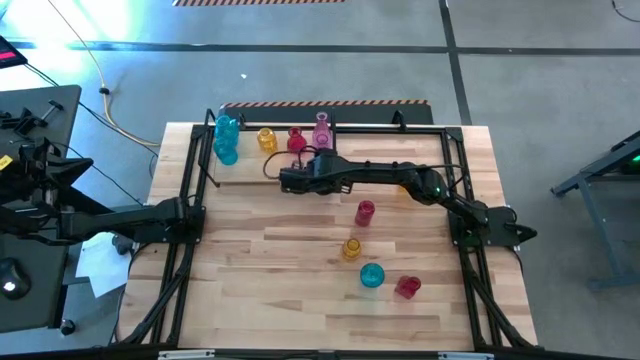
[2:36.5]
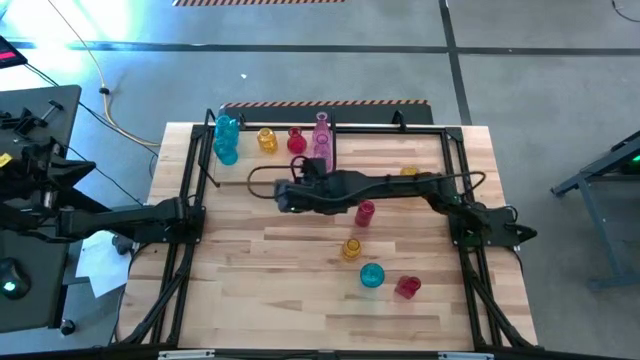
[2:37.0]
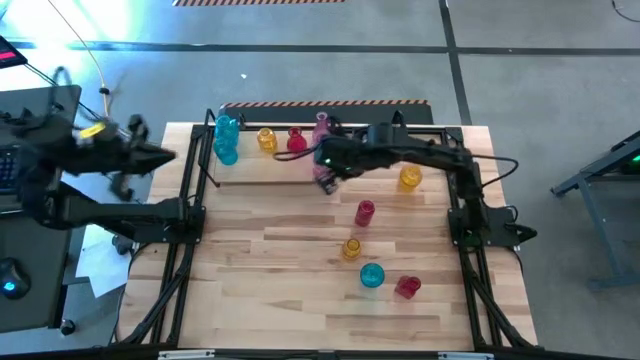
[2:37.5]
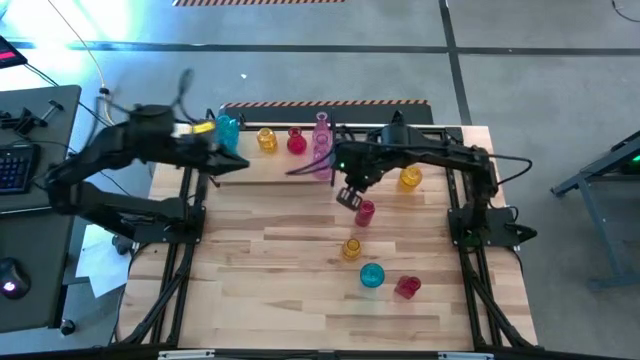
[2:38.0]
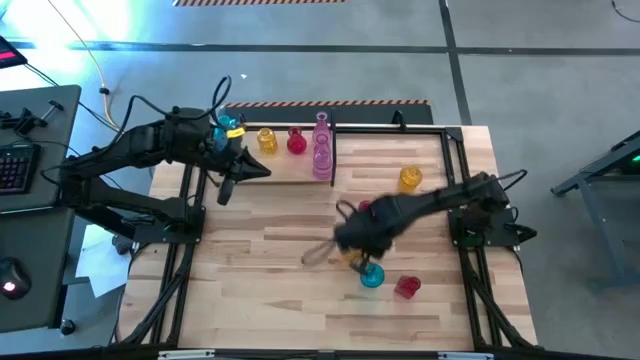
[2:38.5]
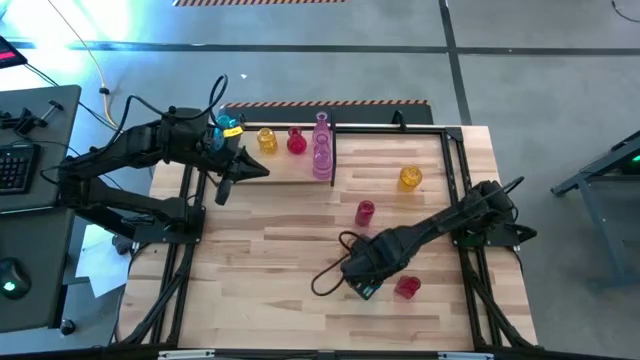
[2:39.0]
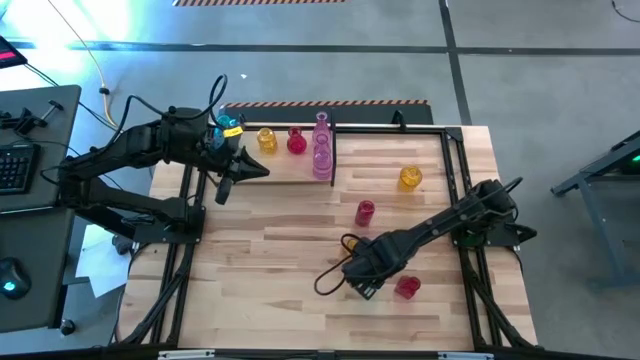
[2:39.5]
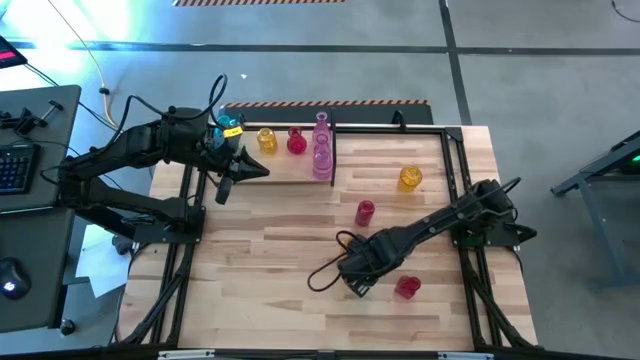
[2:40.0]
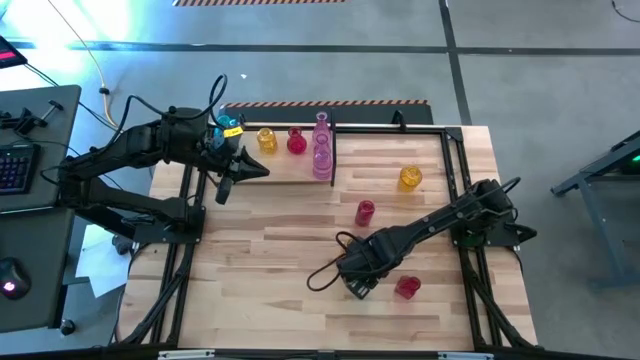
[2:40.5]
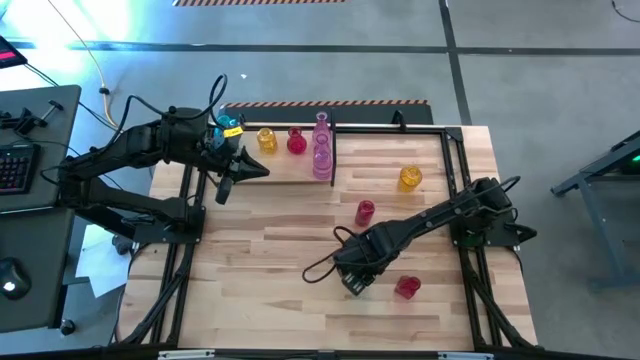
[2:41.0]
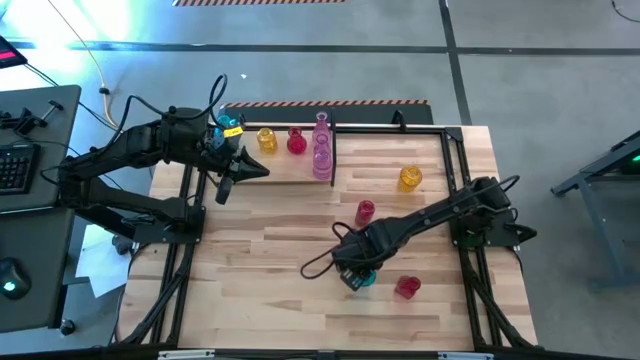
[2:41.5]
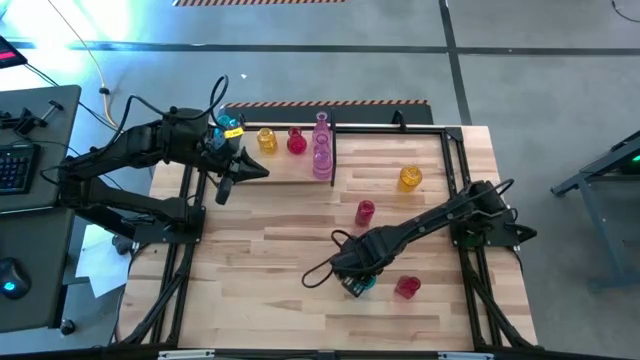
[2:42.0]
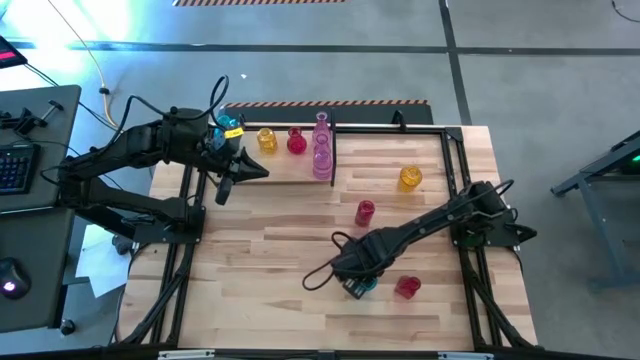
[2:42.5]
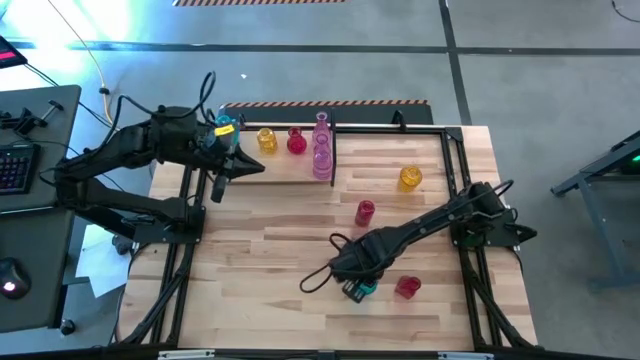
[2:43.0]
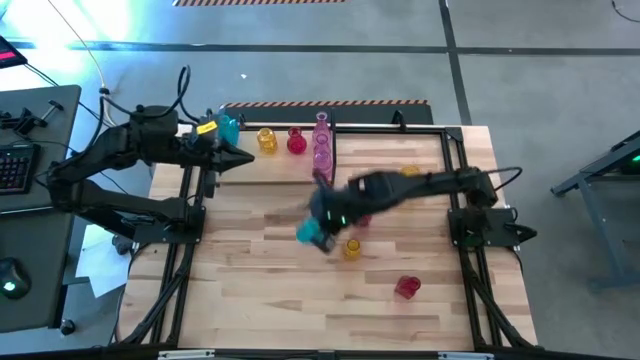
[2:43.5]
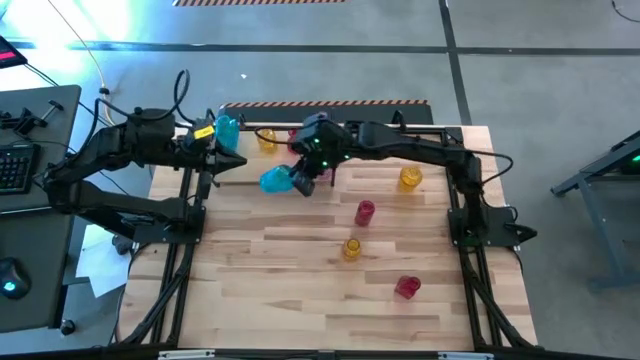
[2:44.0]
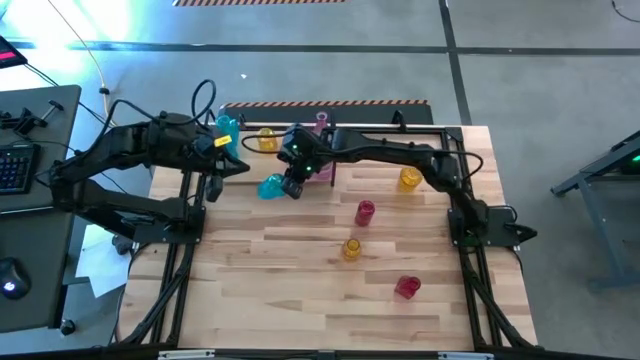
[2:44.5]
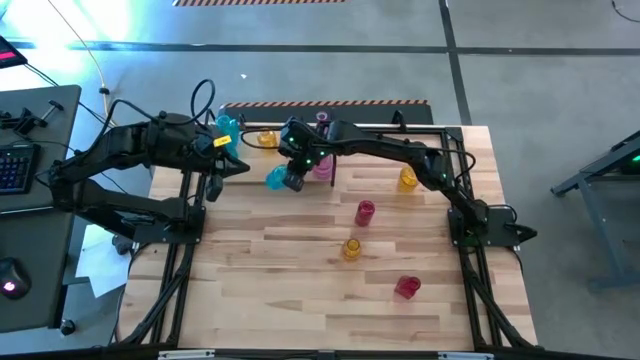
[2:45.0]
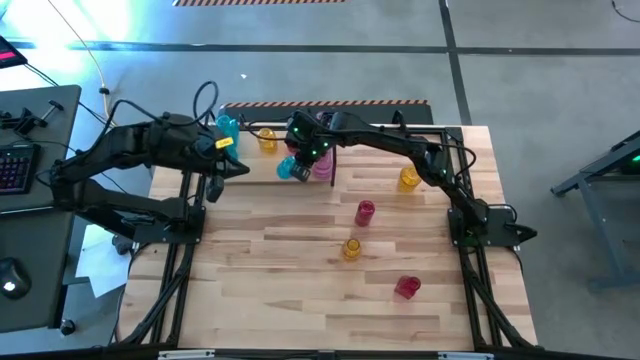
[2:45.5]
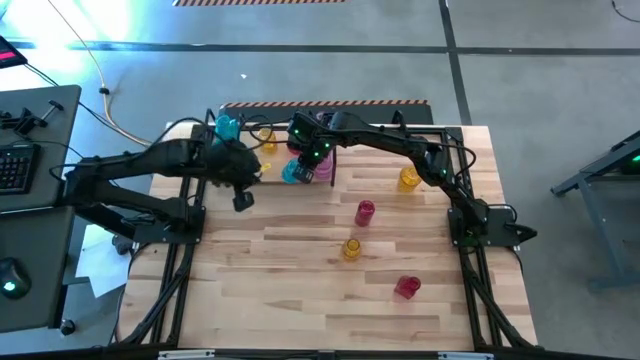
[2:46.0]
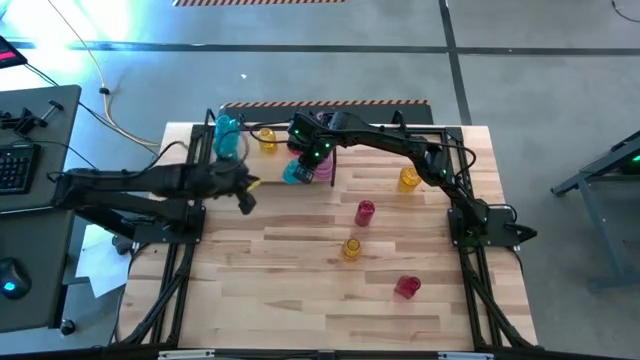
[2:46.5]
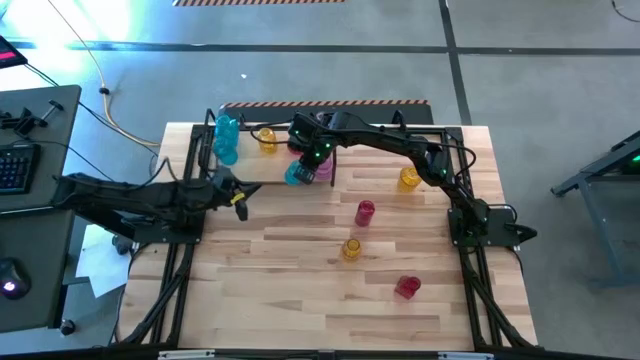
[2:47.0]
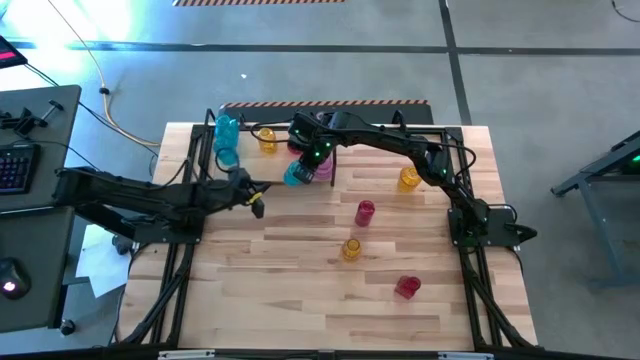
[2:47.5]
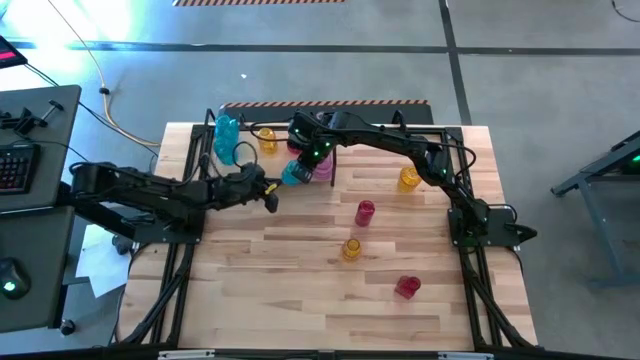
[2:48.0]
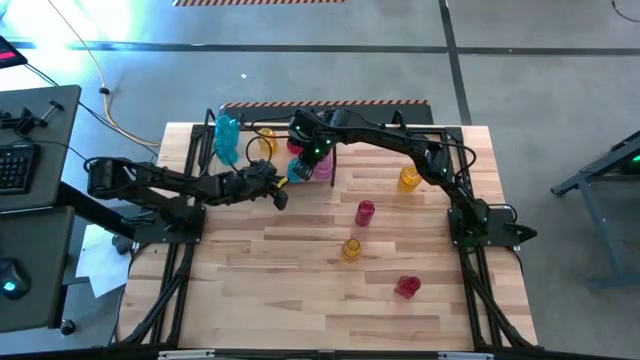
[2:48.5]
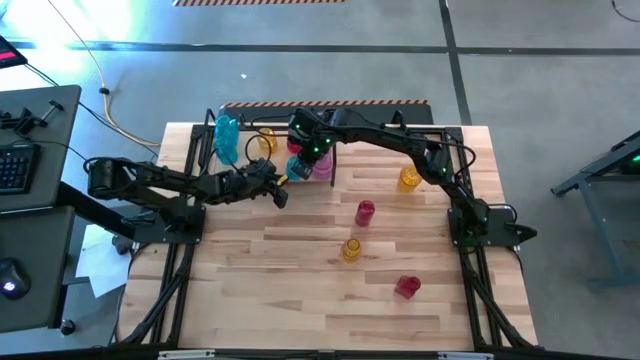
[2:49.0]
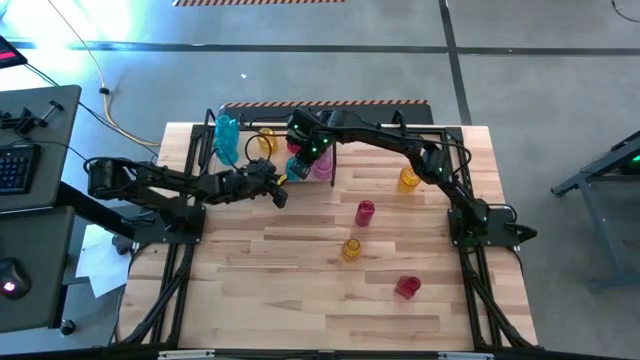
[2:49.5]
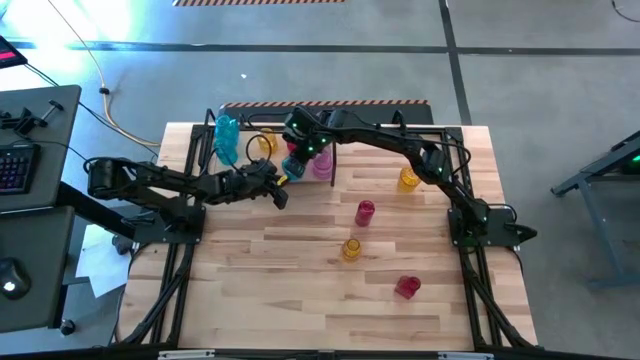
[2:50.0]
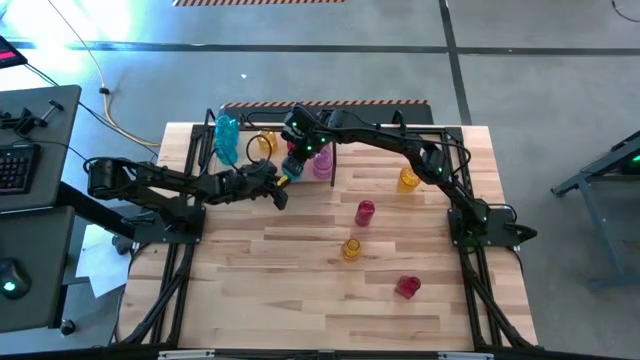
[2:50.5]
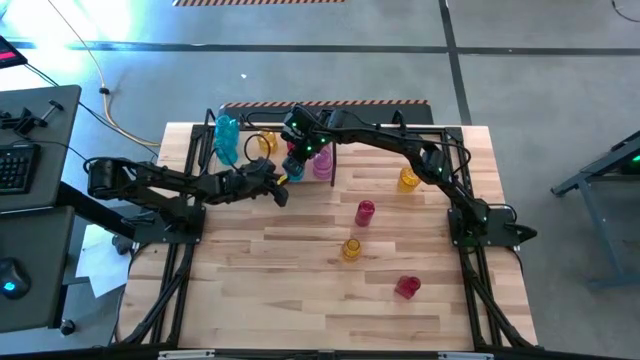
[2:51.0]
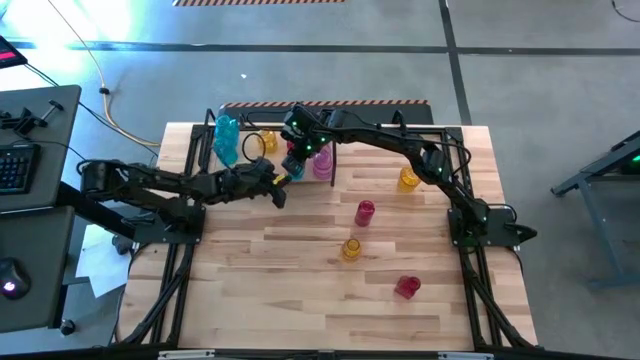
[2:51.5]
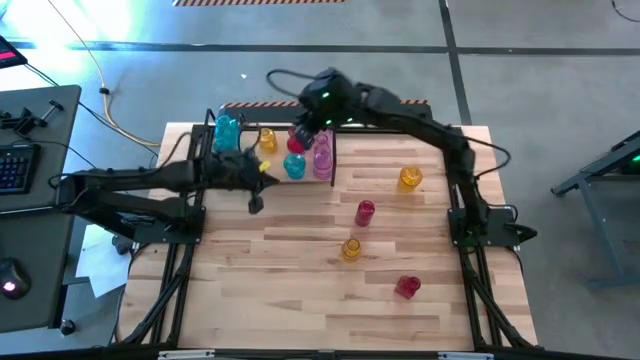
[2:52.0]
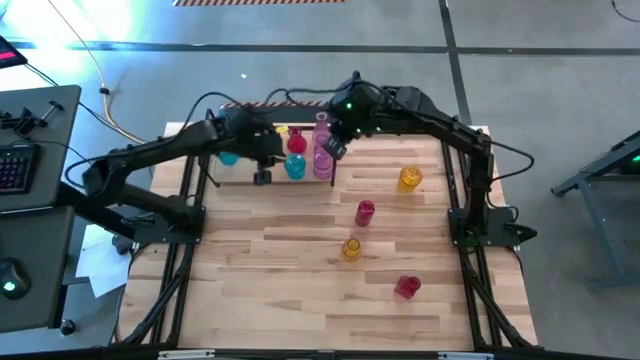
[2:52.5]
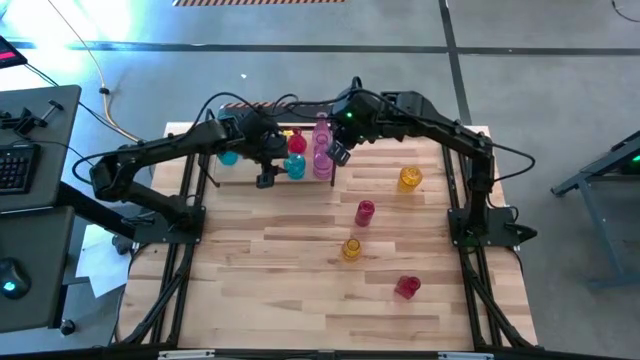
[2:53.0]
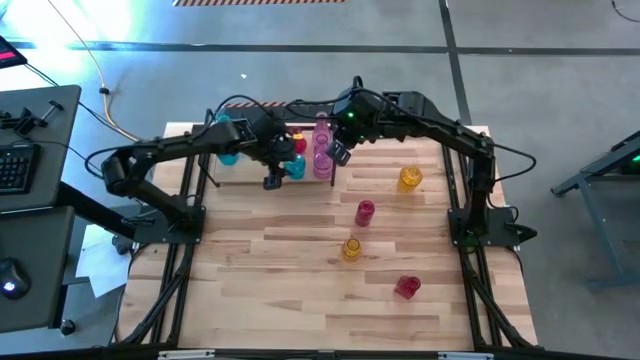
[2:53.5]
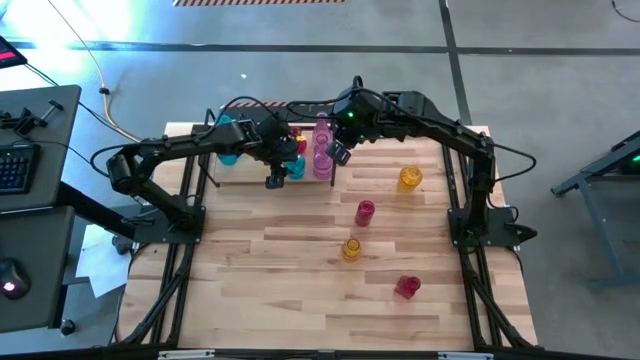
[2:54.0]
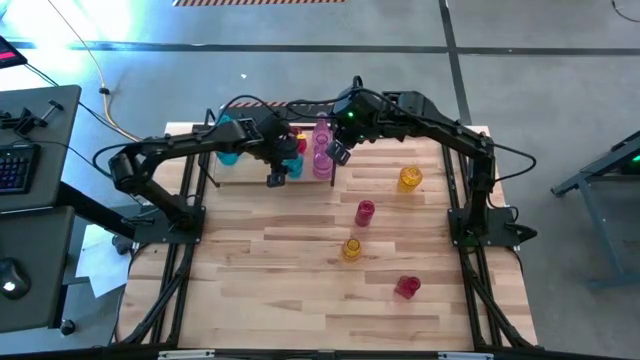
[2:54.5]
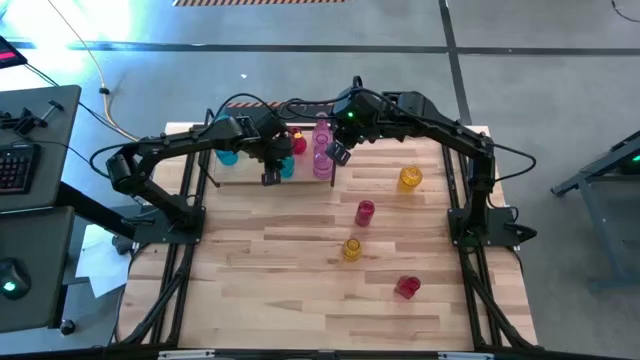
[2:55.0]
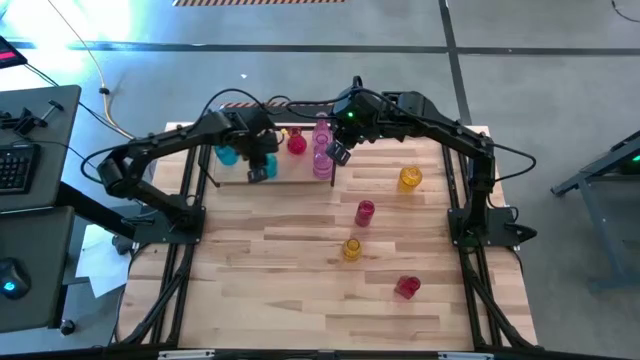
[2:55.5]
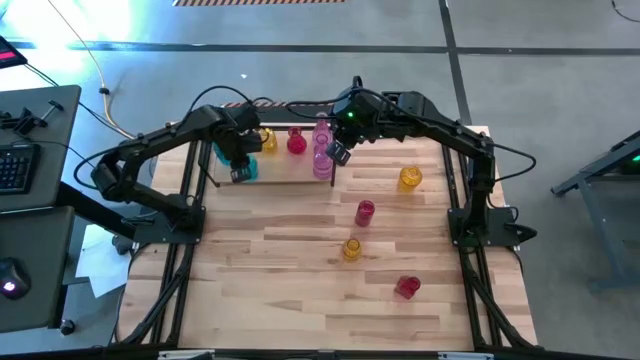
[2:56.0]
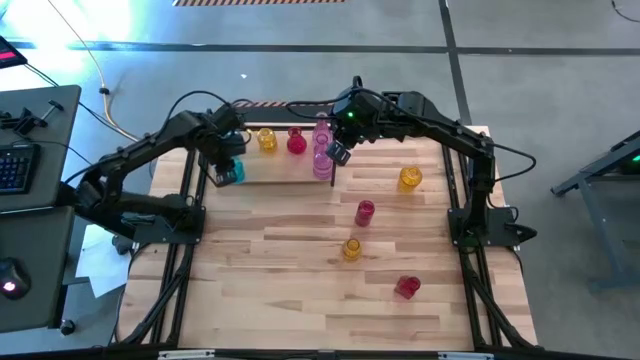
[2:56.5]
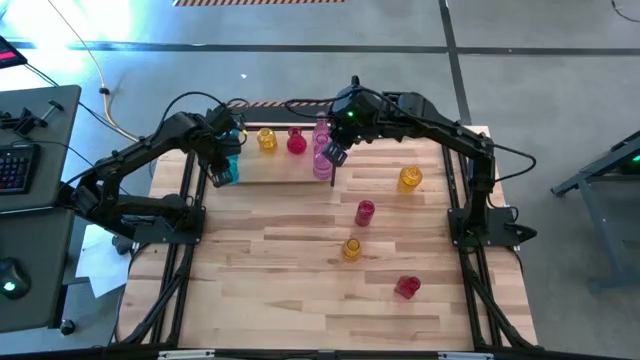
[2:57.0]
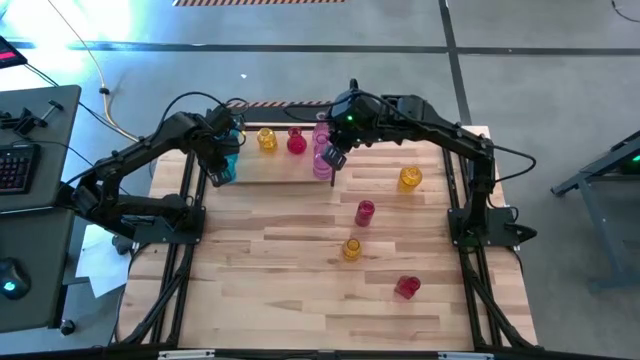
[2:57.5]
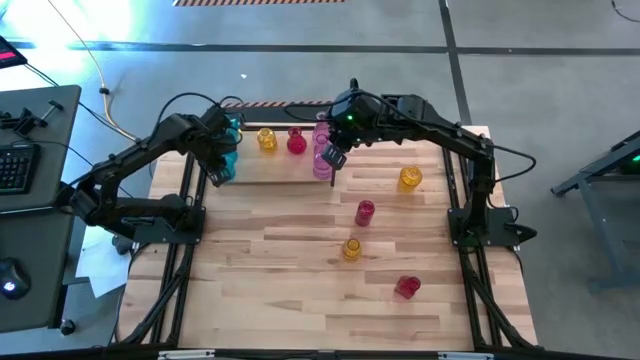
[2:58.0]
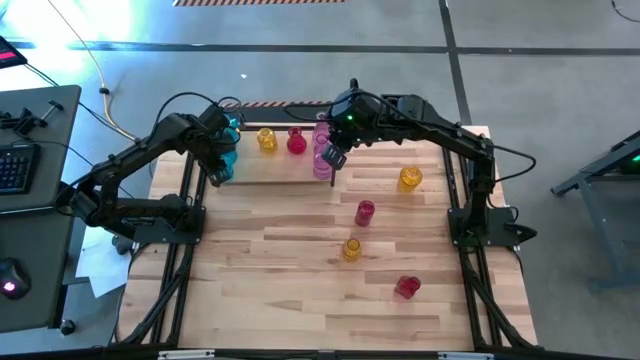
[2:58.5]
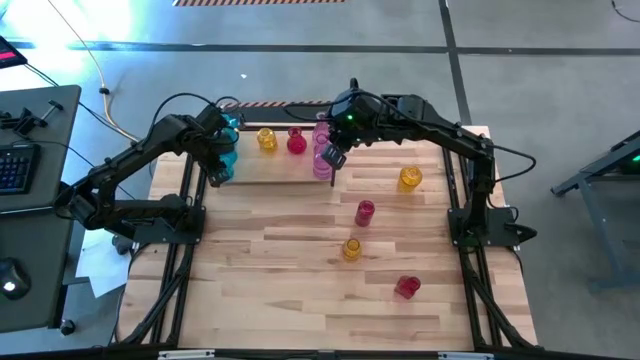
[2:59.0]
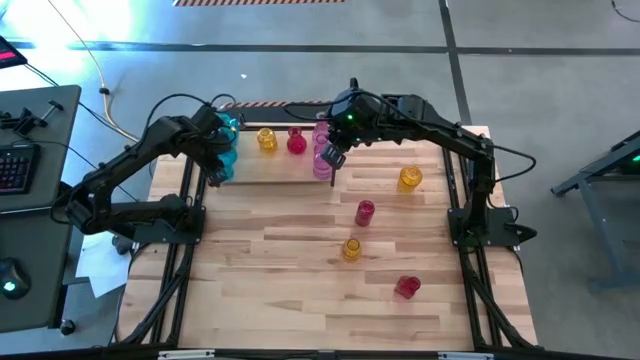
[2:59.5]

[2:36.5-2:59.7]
Task: sort vases onto shelf
Put the blue vase on the shelf aligned with the other blue vase
